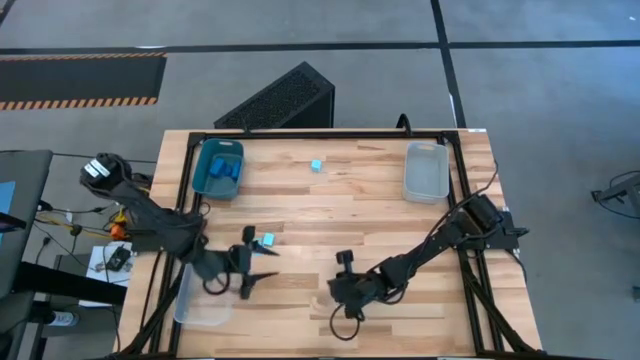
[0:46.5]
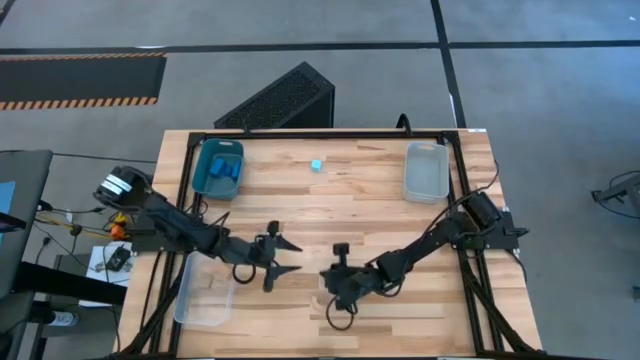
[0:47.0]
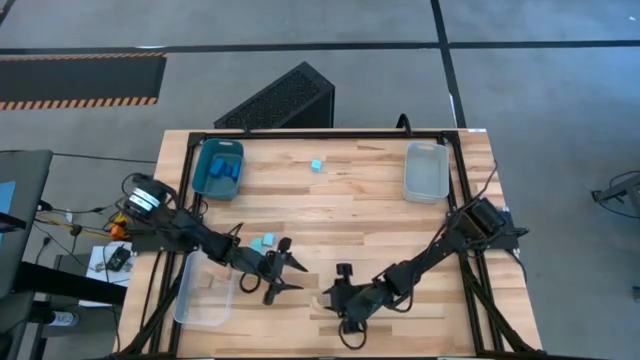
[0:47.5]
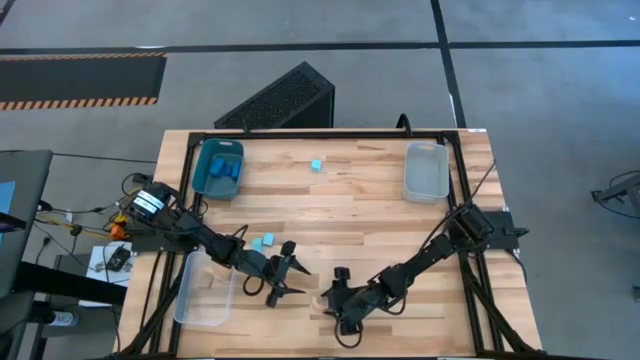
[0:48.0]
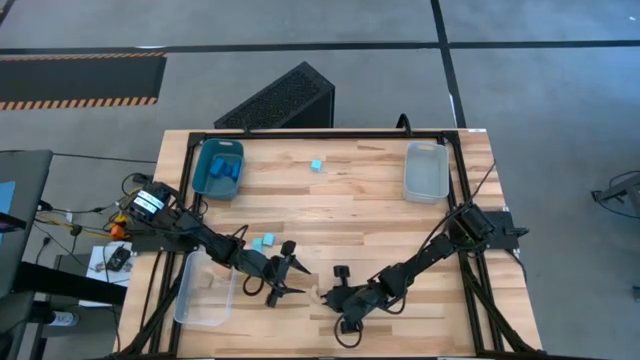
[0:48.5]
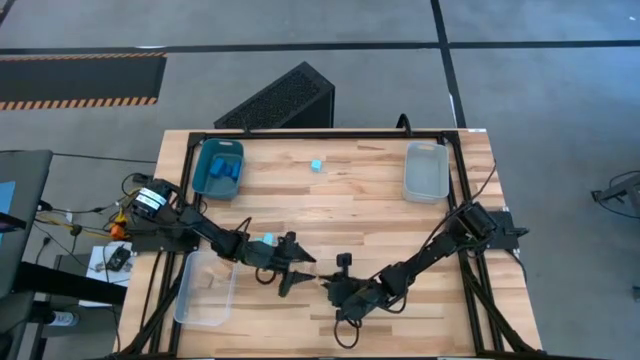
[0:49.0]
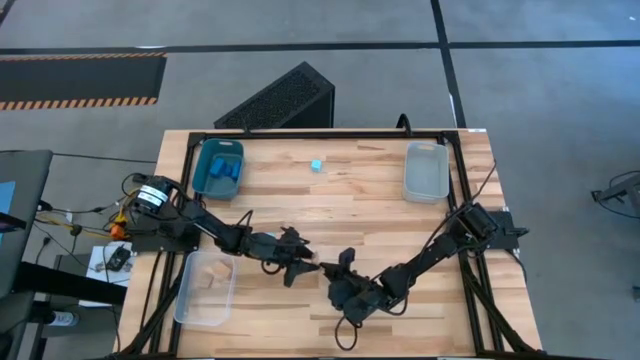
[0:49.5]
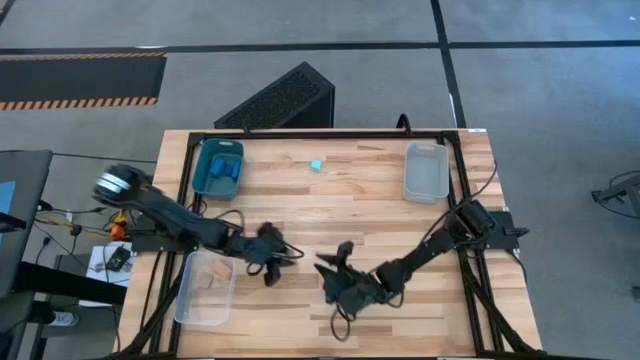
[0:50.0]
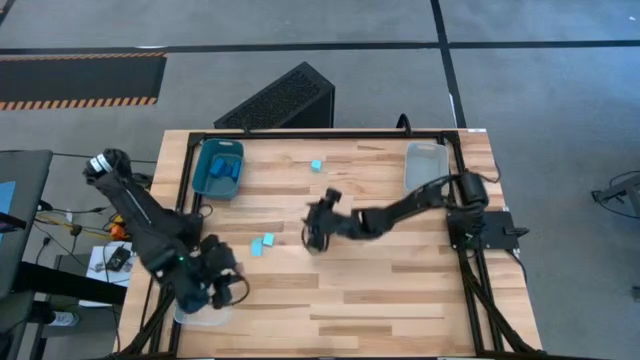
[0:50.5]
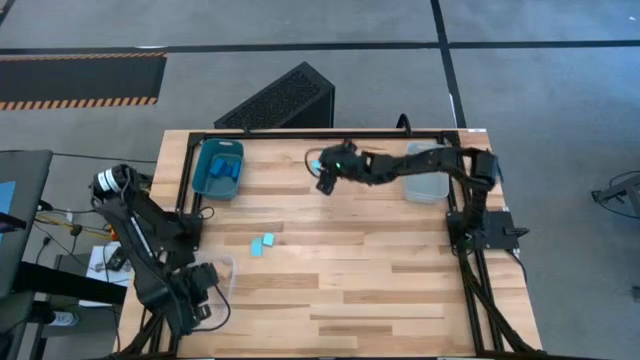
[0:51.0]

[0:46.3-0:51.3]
Task: Sort & place blocks by color
Put the brown block into the transparent bin

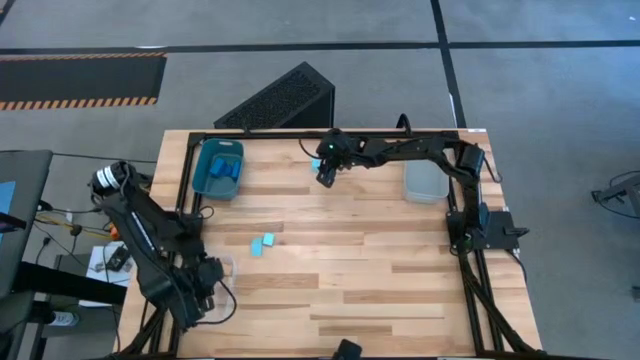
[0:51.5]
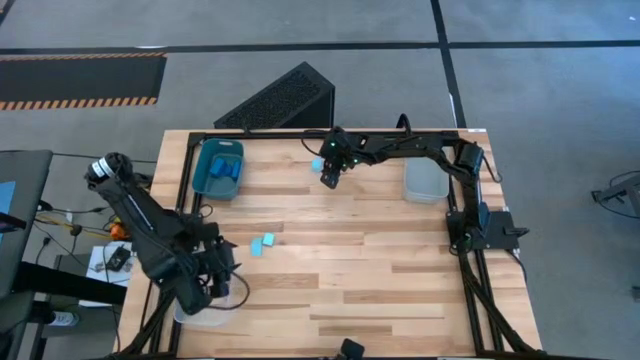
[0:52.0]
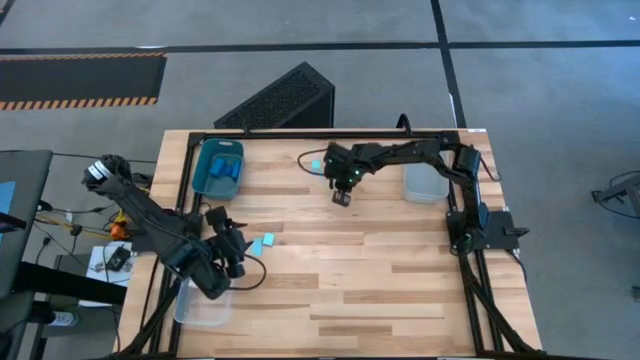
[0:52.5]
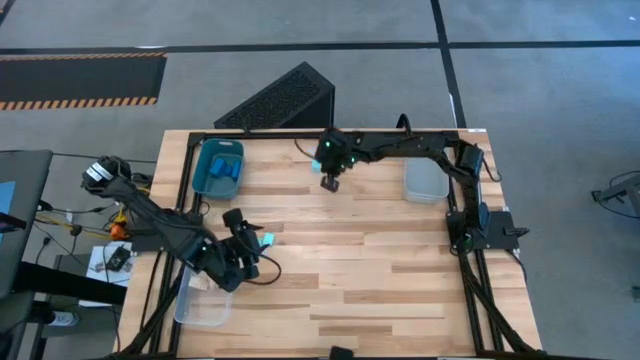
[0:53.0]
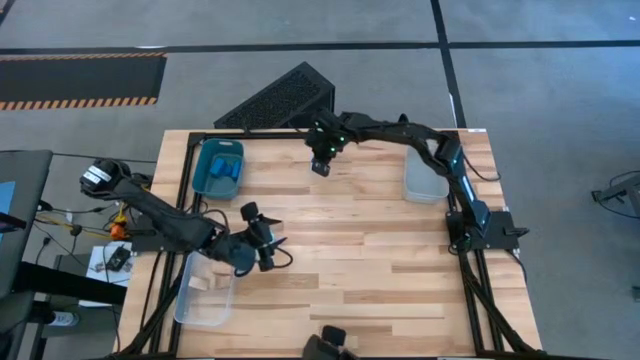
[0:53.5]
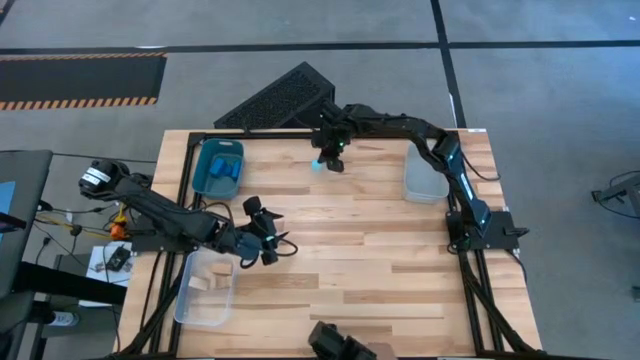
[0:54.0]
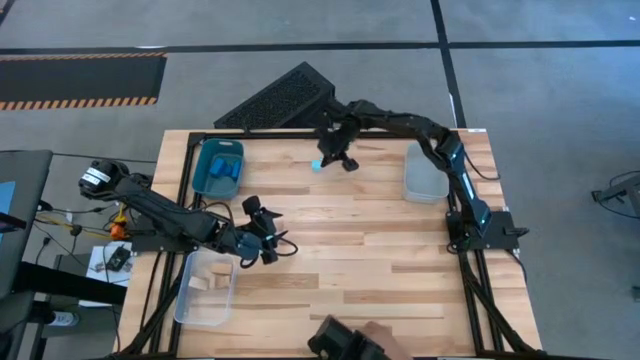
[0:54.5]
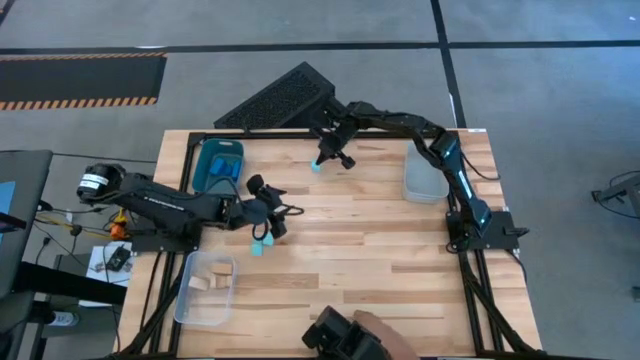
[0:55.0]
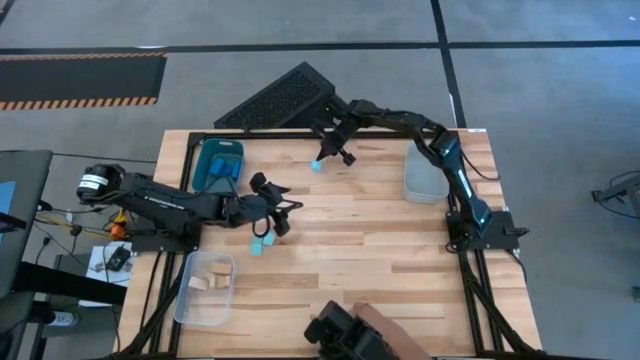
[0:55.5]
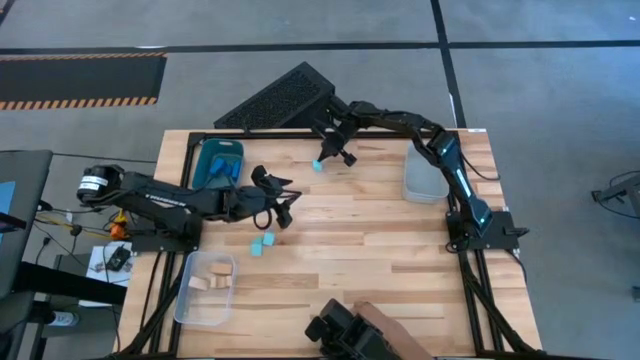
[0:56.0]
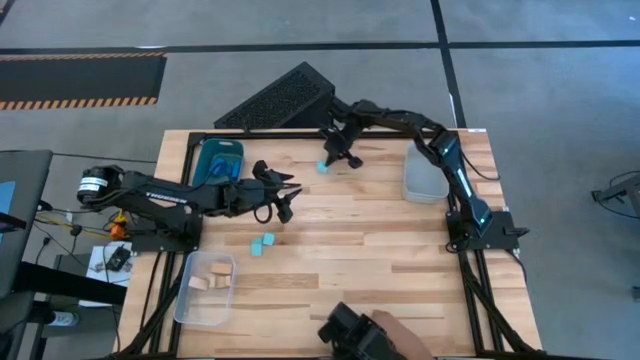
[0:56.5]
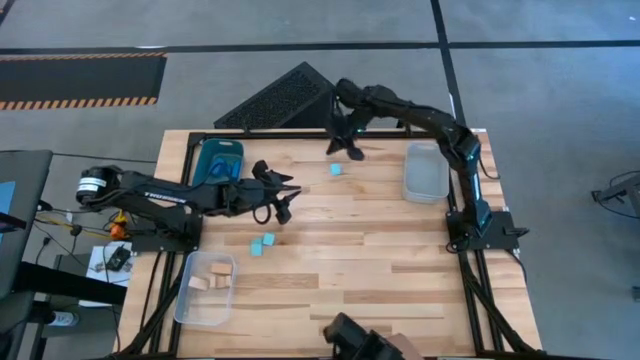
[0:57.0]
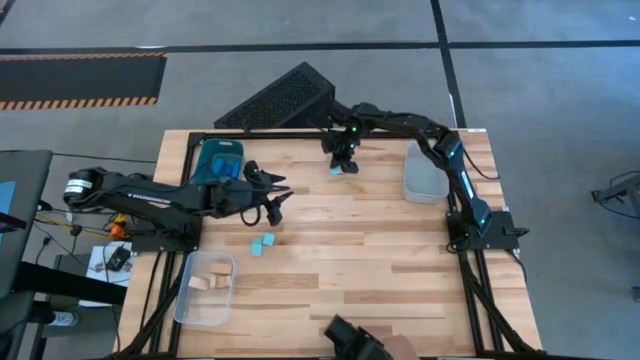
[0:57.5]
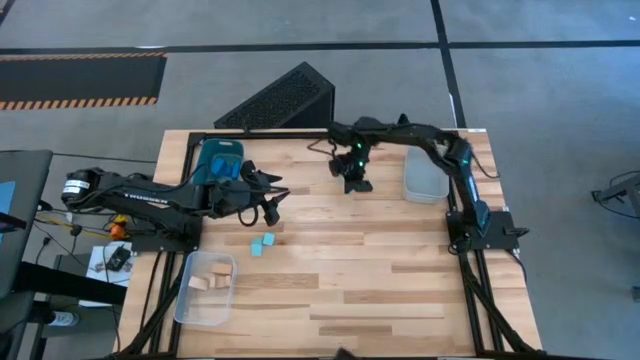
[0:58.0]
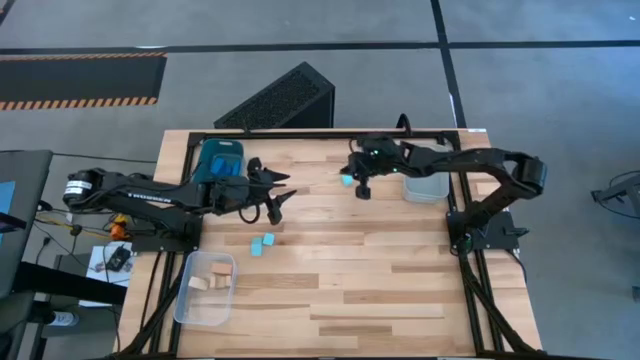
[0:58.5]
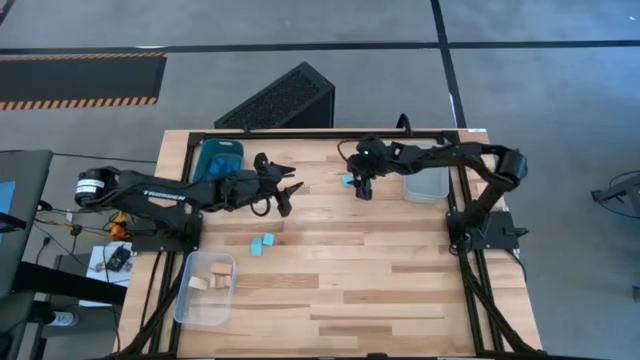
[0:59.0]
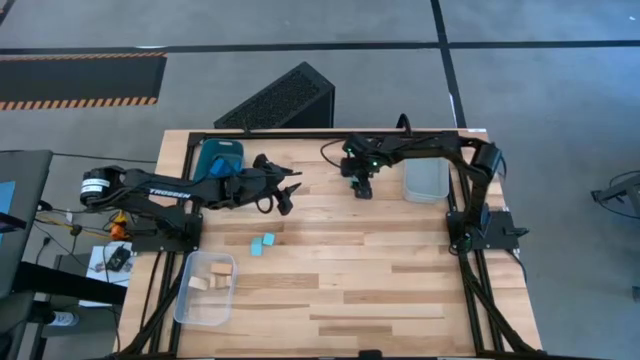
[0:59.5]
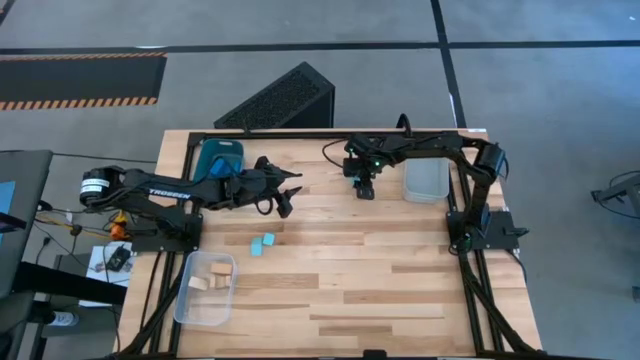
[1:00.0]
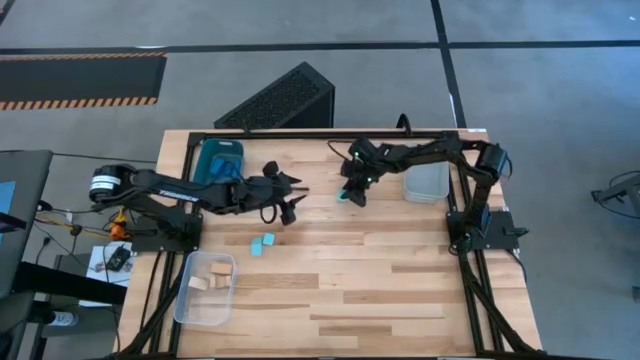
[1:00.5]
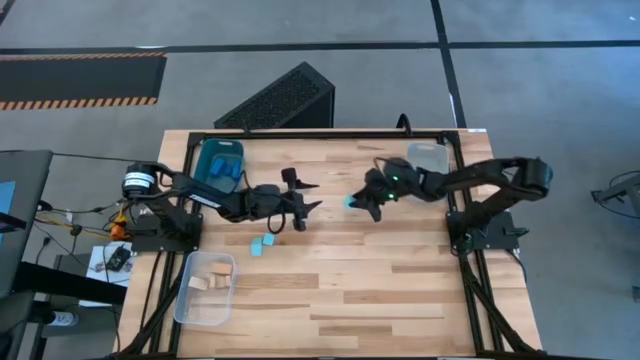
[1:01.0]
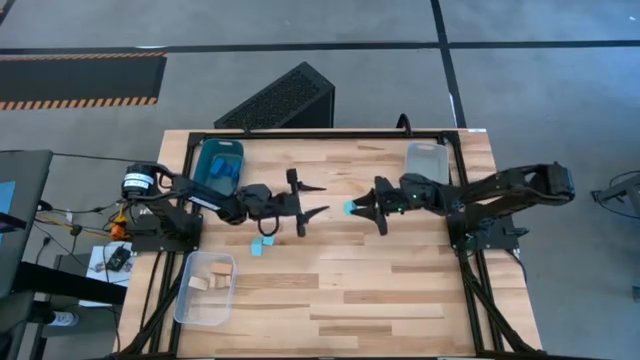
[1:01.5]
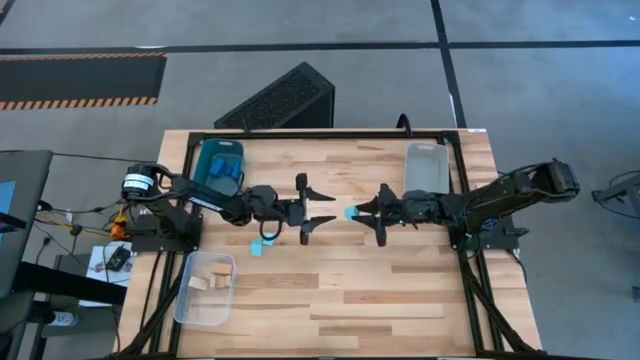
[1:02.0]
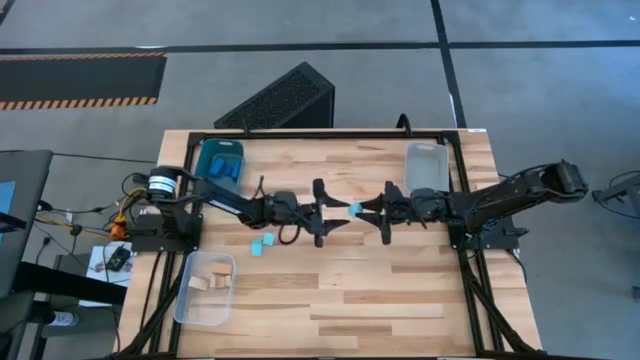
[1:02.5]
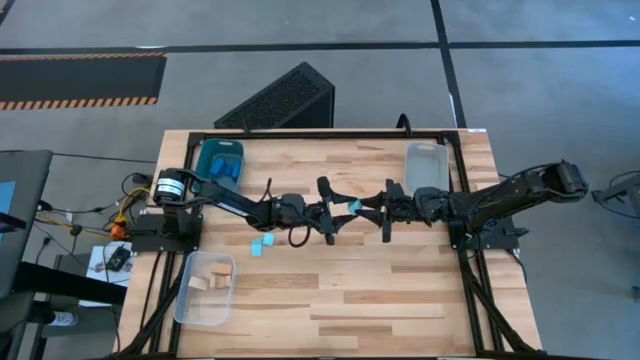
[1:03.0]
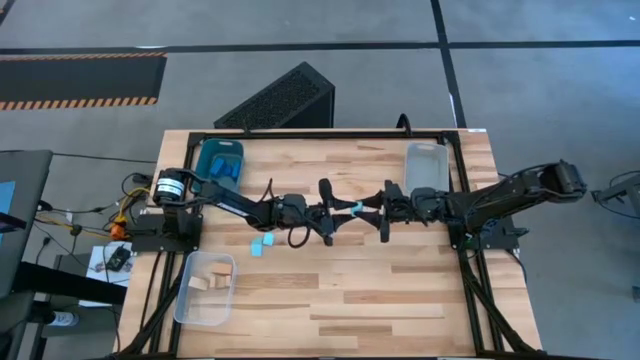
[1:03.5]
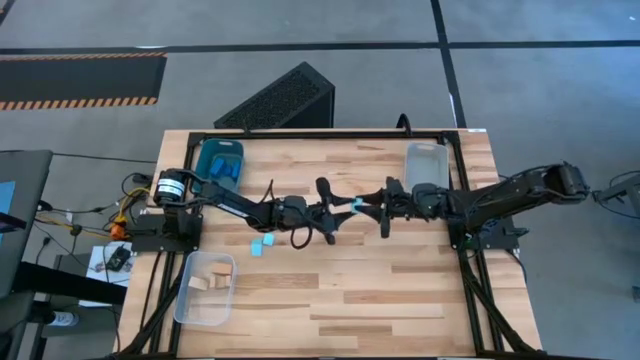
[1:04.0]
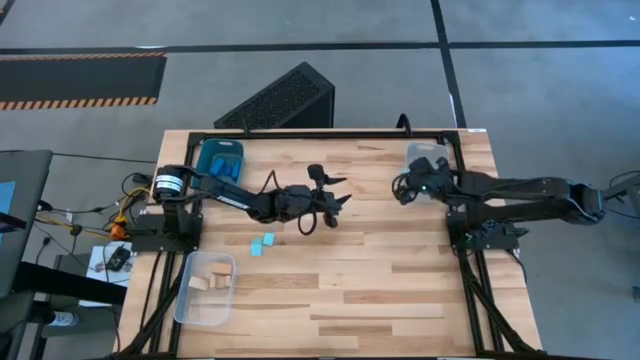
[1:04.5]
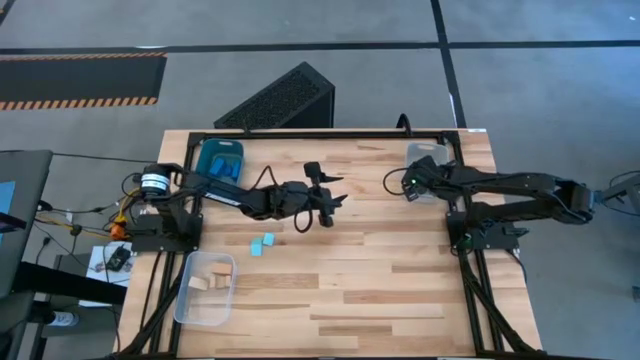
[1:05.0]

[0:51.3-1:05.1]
Put the top light blue block into the grey bin

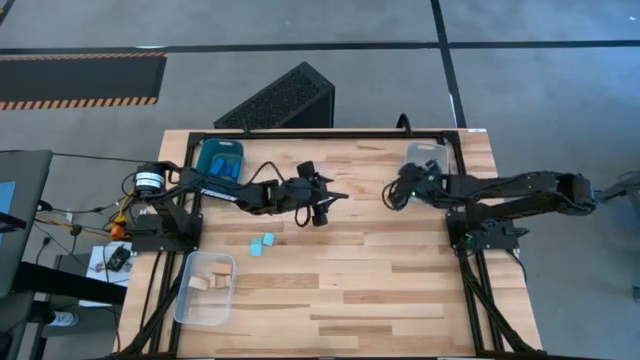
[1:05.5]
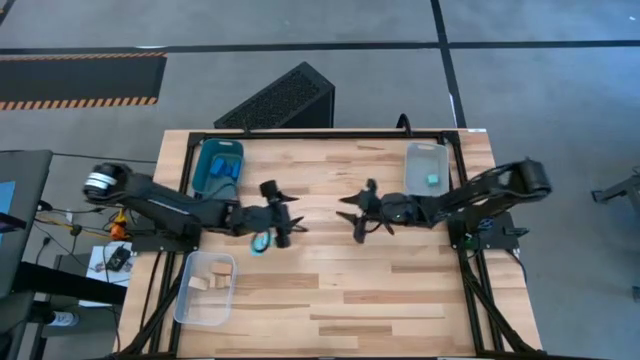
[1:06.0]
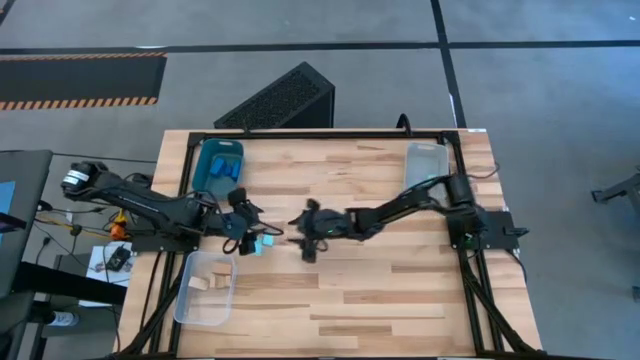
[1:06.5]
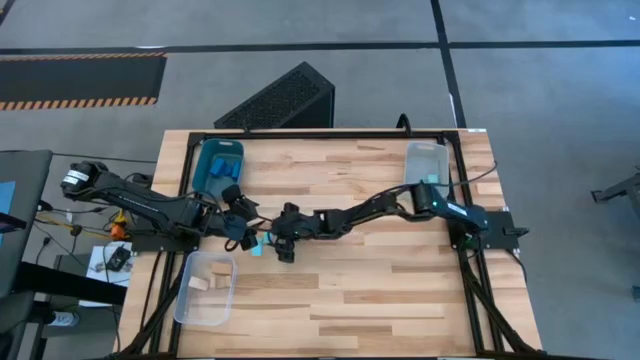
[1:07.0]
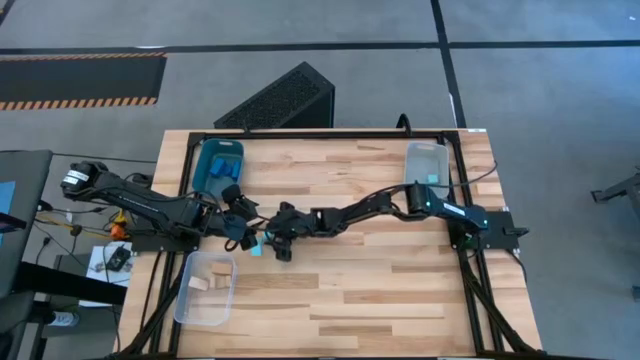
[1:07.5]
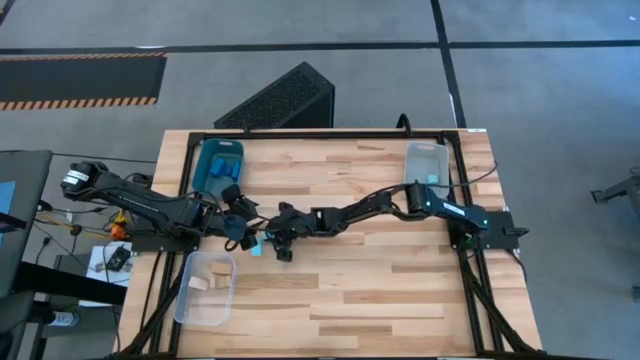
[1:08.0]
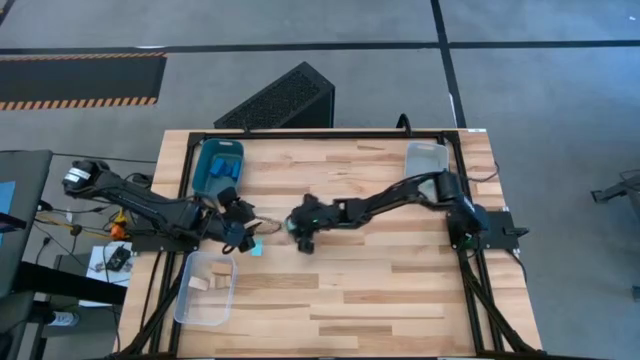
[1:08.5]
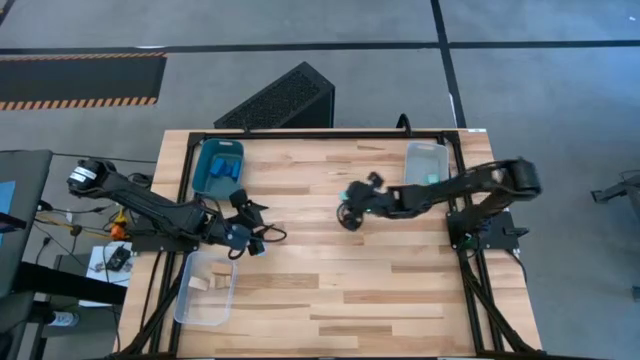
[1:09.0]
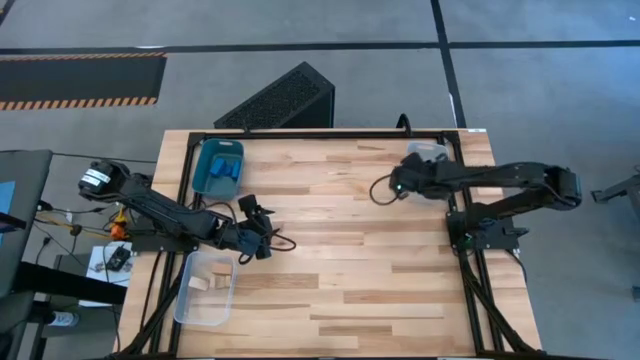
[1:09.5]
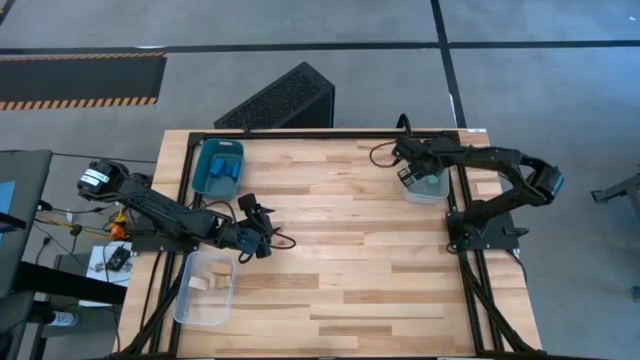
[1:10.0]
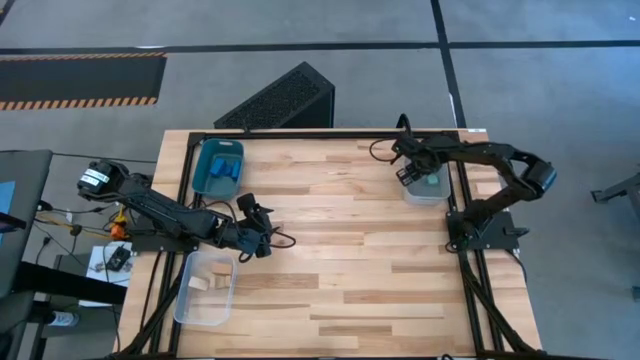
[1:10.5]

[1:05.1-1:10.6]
Put the right light blue block into the grey bin
